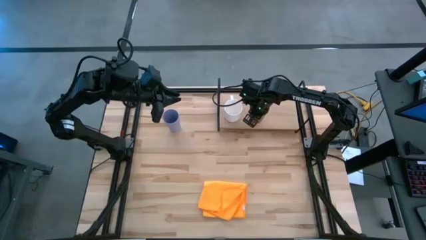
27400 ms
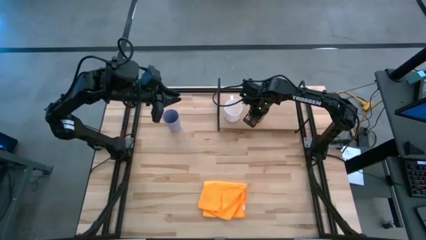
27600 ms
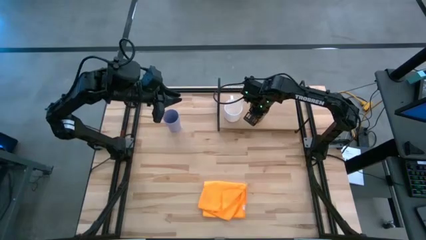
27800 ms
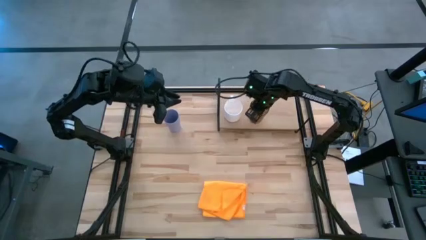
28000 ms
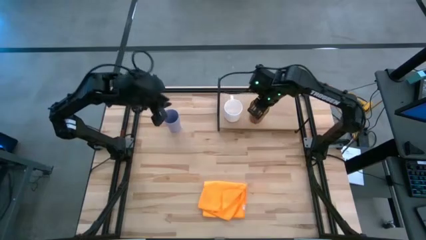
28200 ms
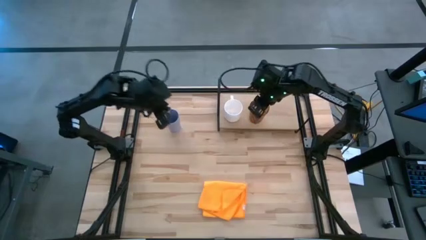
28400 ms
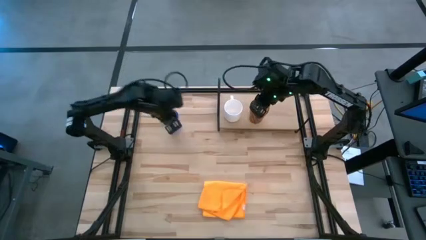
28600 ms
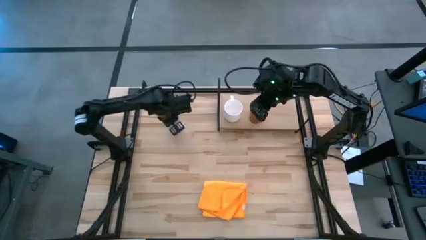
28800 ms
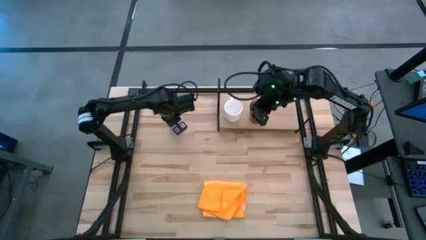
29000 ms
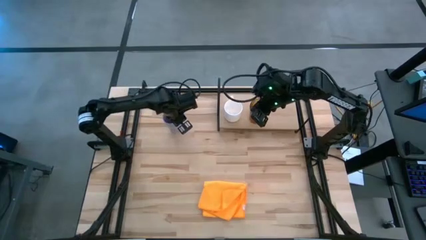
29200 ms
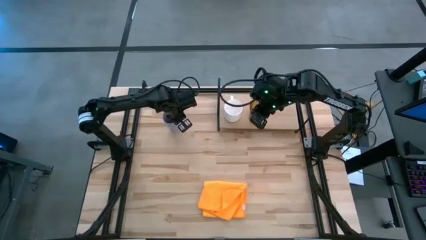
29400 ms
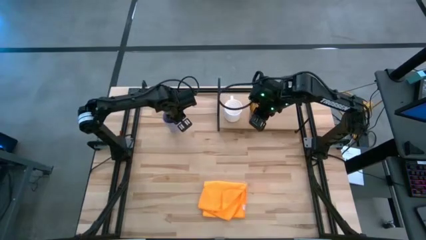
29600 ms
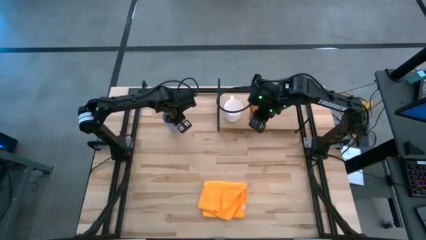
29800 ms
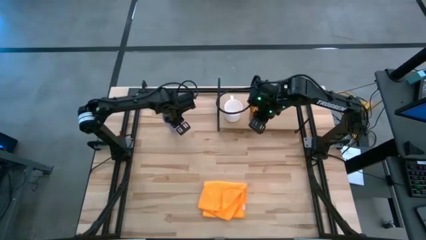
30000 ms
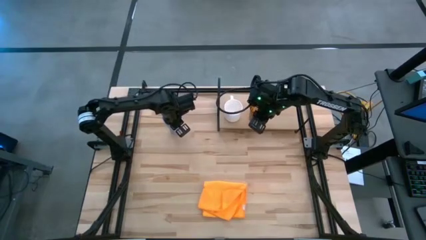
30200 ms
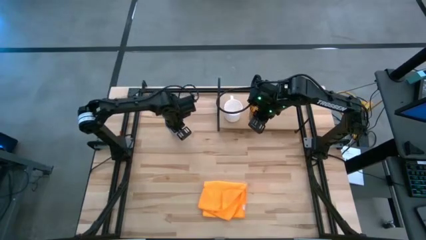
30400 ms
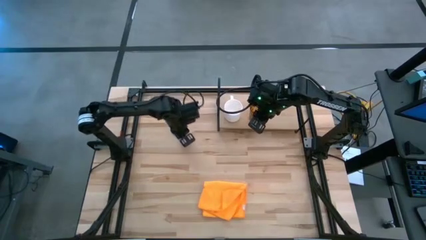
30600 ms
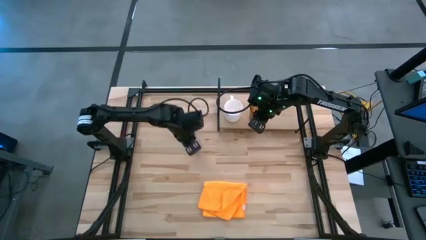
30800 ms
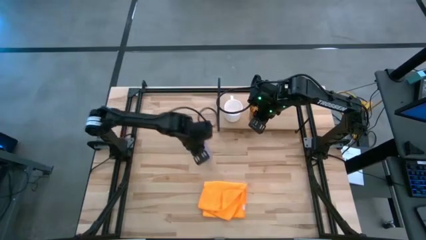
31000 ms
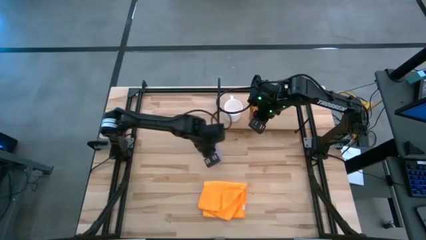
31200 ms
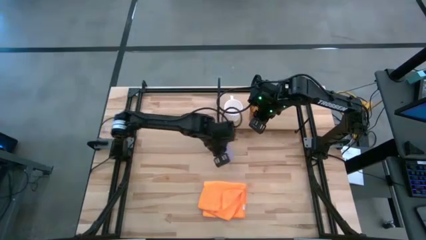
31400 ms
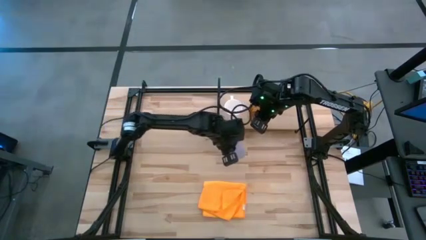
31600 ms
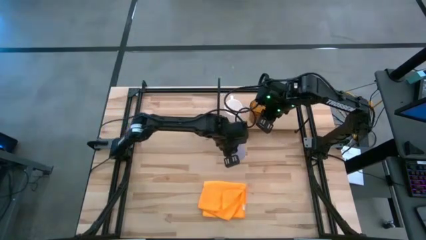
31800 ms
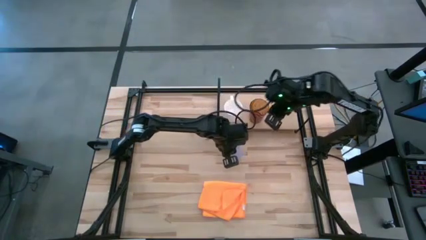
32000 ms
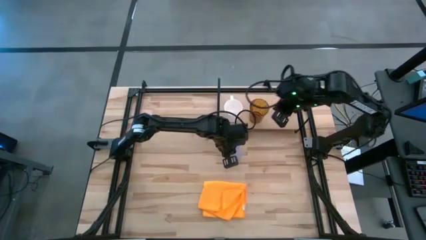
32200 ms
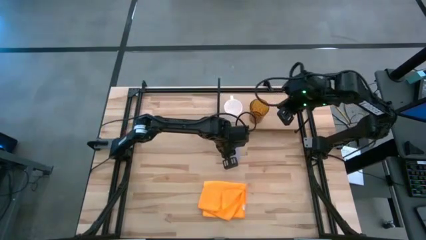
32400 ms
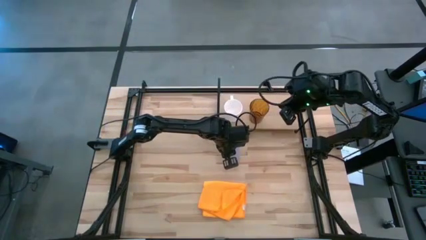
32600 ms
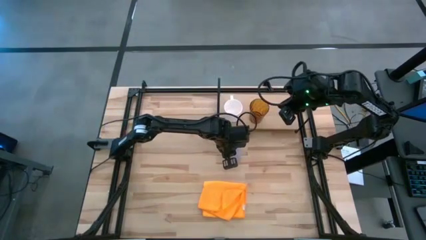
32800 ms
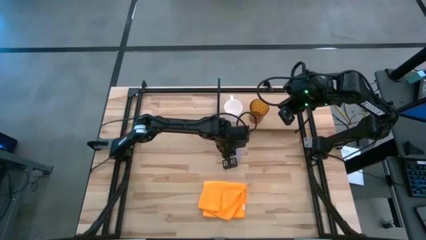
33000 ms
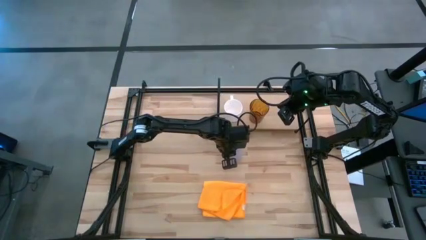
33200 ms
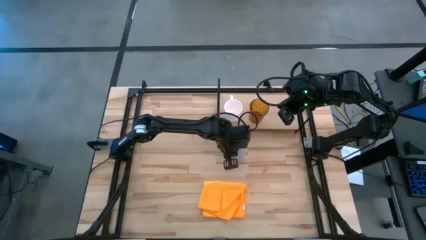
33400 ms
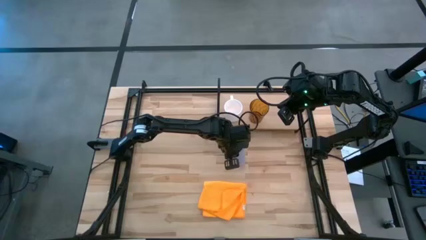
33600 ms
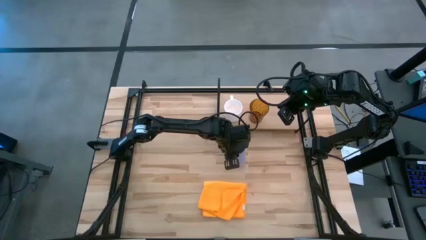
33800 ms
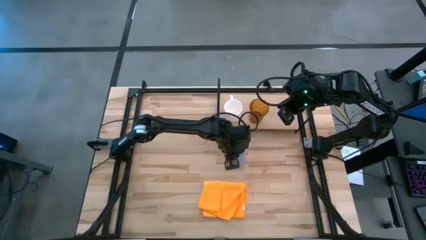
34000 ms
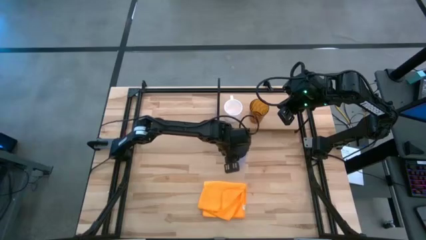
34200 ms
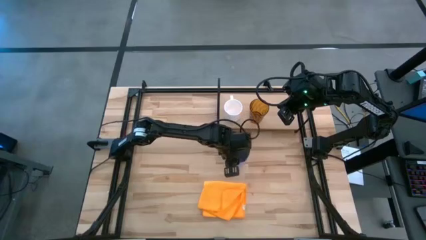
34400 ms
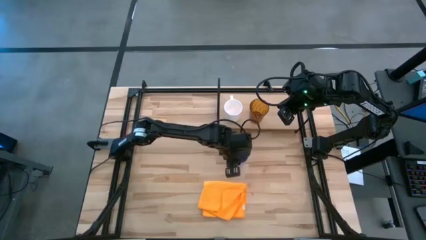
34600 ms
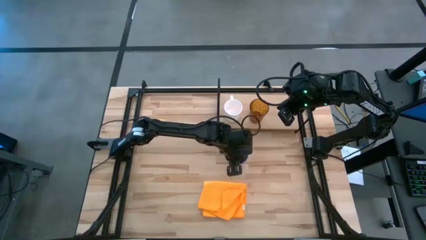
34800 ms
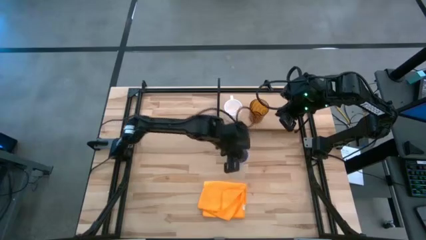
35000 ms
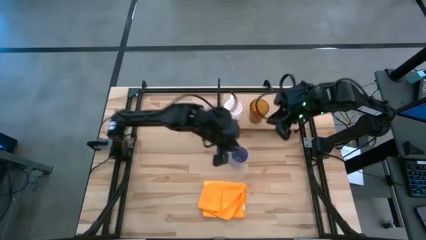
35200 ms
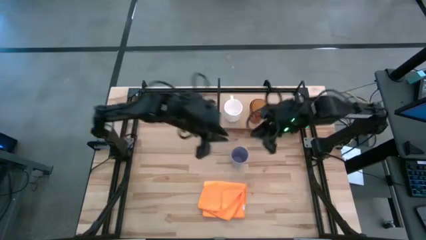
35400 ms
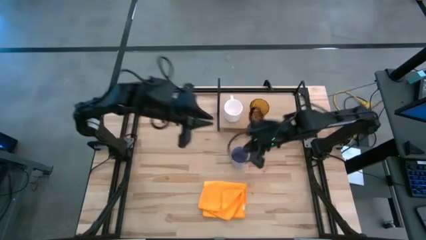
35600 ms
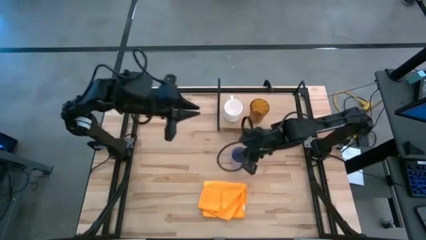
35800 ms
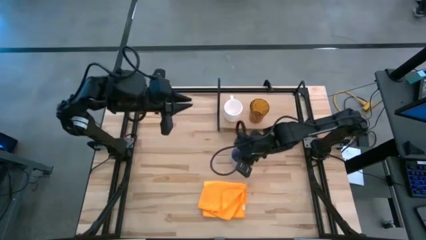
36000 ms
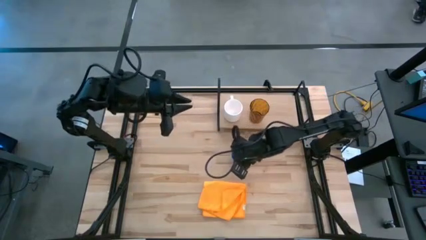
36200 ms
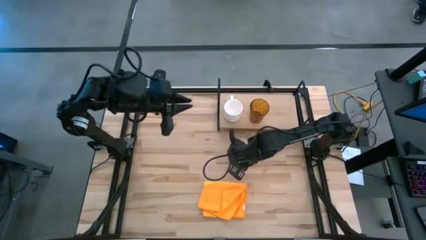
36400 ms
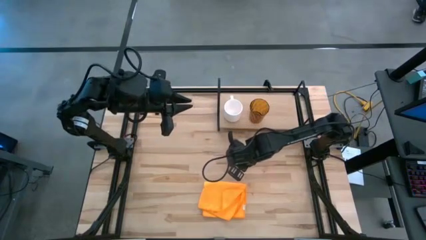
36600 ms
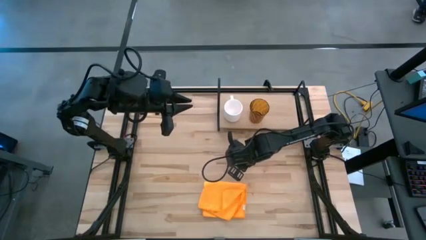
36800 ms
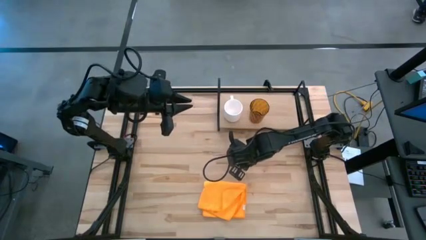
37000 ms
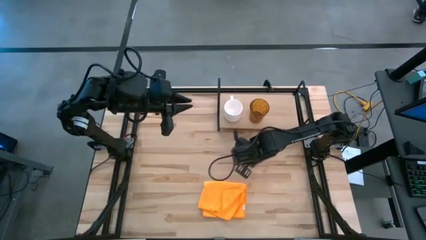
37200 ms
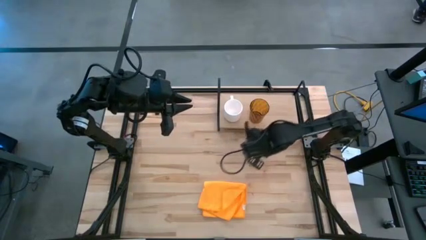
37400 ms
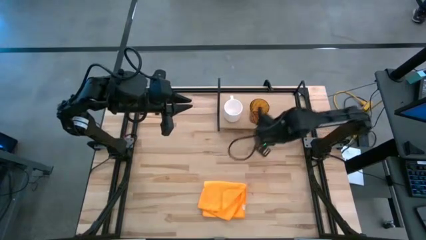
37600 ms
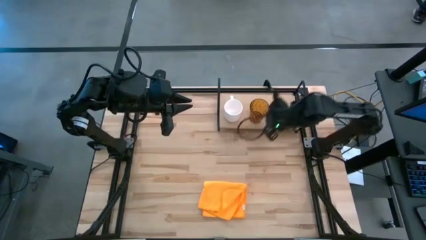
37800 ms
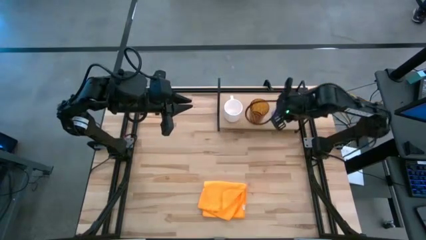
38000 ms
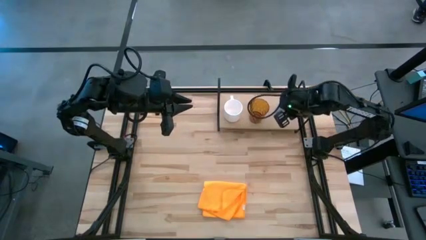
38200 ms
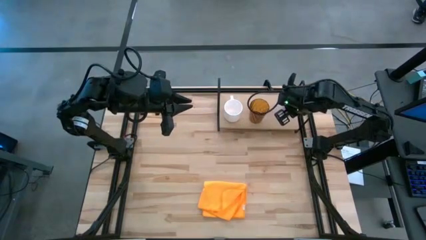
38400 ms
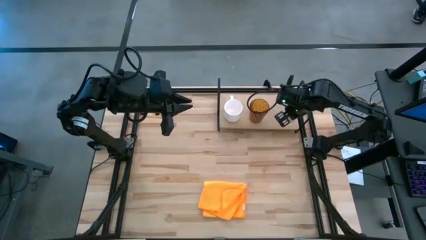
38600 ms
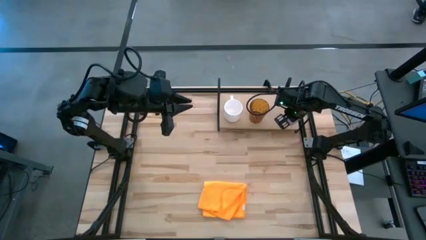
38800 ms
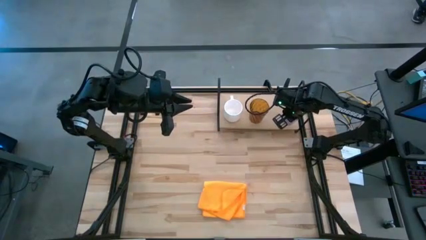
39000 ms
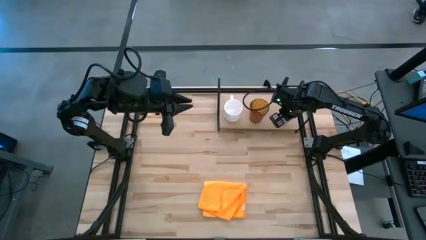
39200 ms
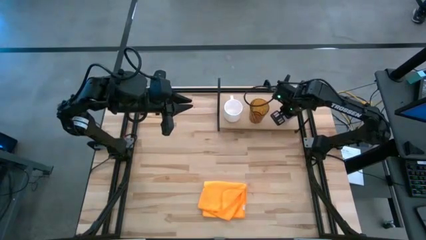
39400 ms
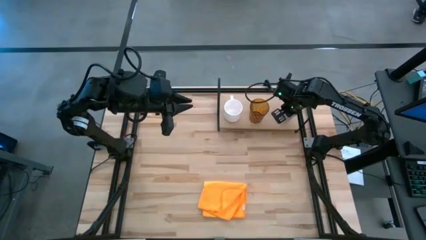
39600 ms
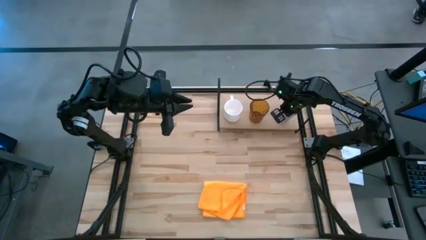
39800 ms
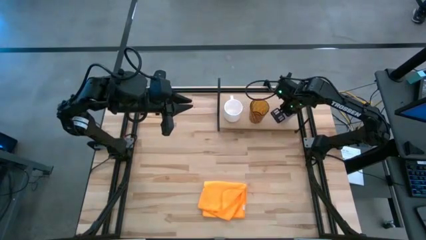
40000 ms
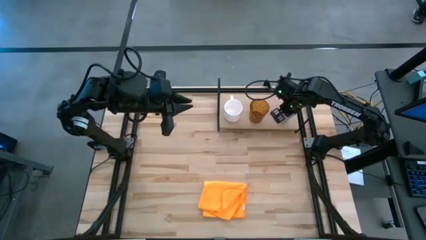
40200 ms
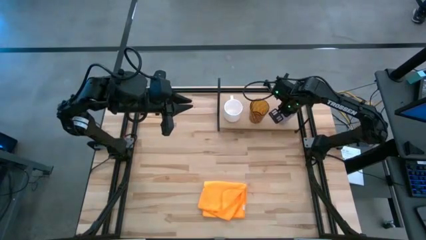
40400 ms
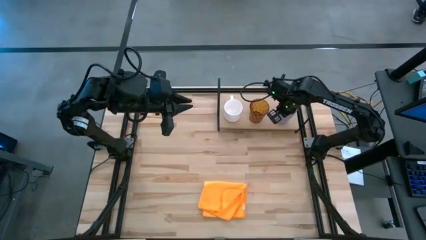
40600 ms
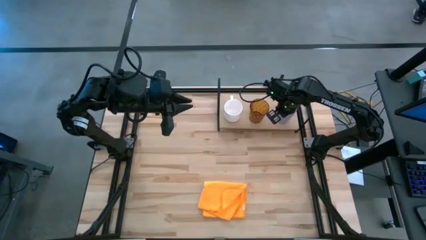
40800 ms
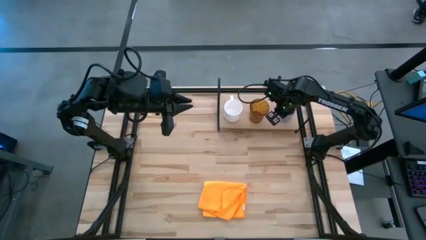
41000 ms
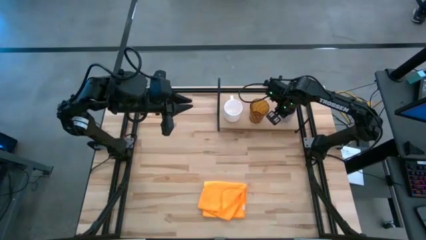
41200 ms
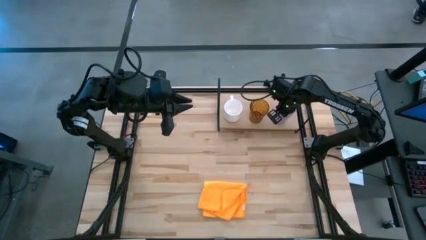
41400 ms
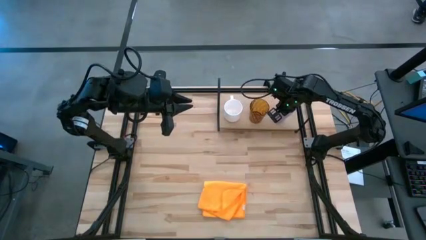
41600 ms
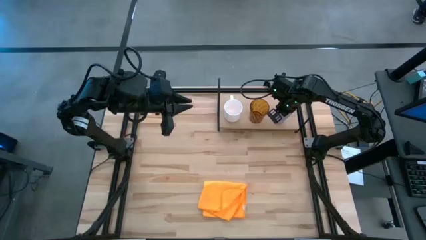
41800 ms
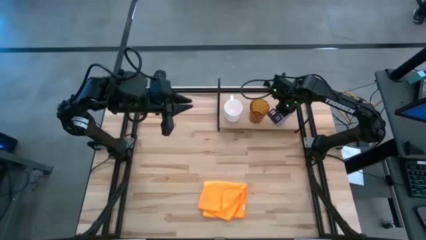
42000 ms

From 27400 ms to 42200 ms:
Task: Stack small to large cups/mugs on shelf
Put the purple cup on the shelf

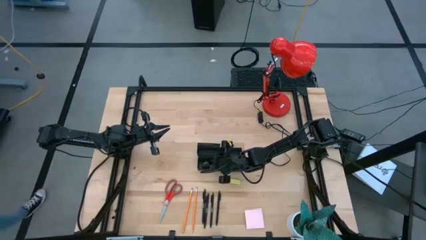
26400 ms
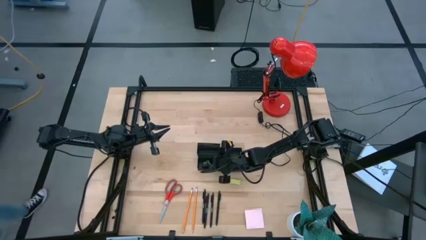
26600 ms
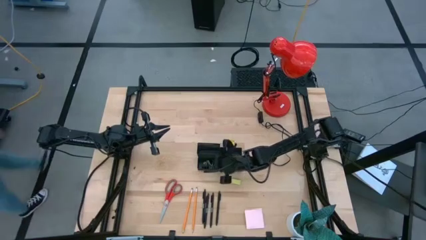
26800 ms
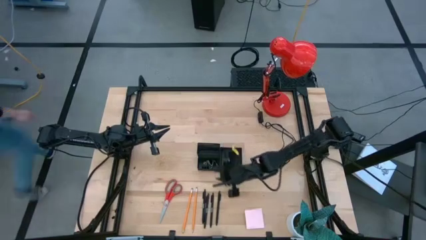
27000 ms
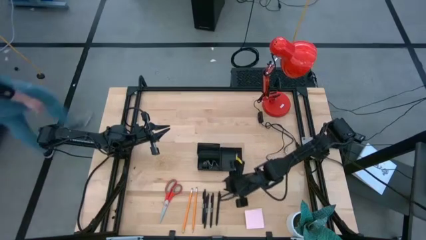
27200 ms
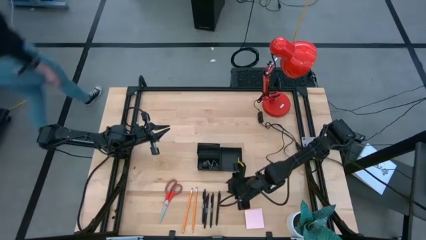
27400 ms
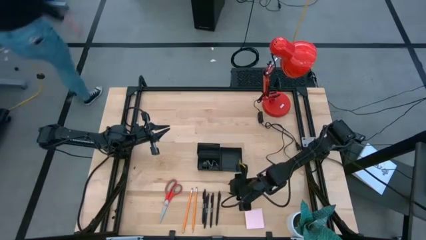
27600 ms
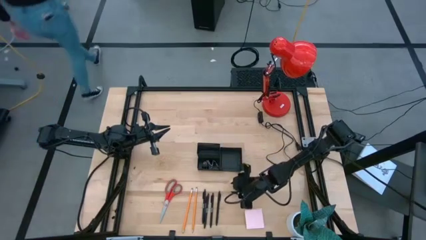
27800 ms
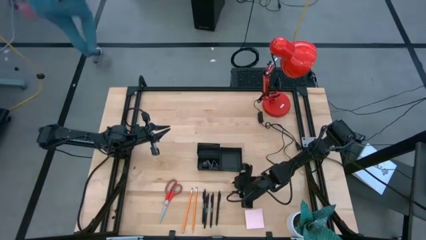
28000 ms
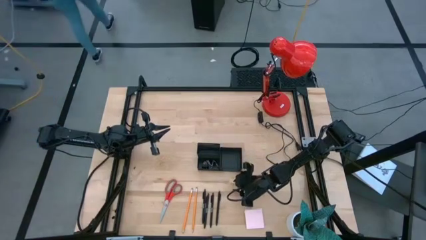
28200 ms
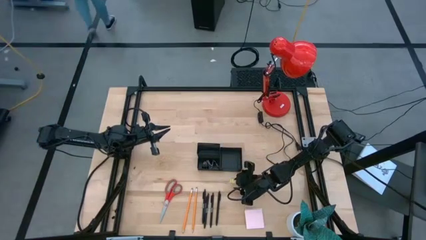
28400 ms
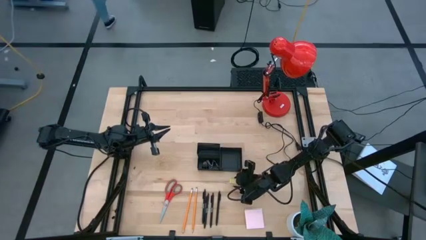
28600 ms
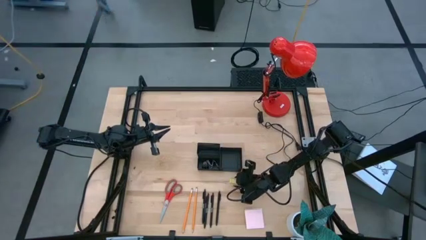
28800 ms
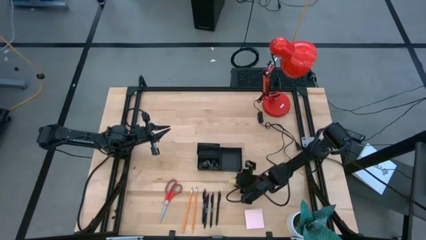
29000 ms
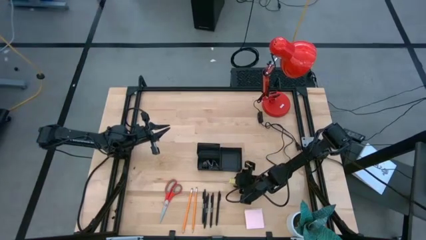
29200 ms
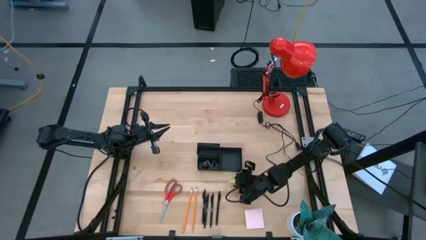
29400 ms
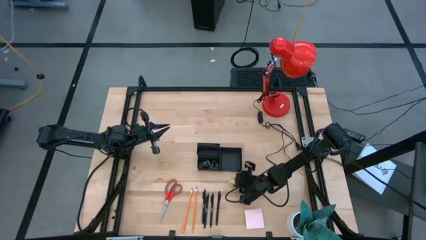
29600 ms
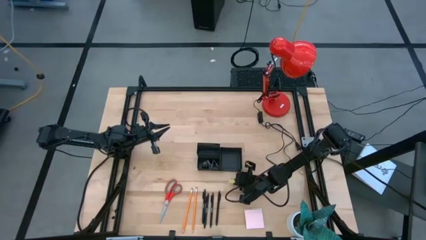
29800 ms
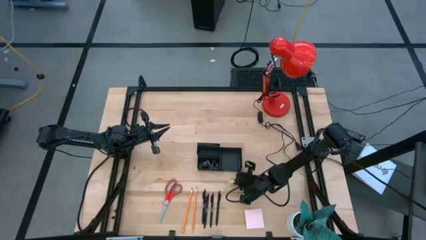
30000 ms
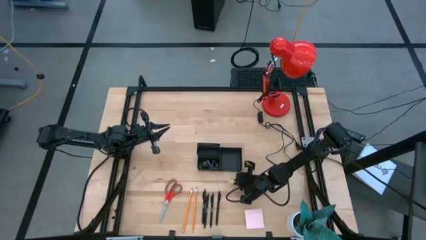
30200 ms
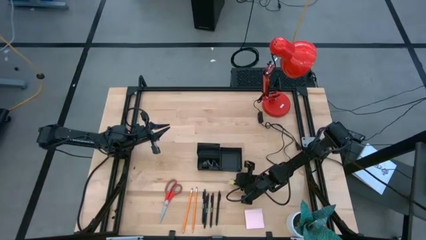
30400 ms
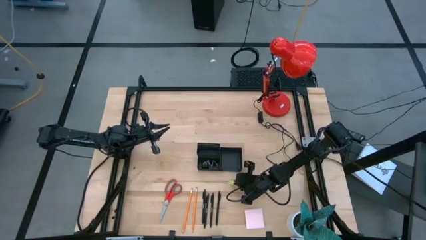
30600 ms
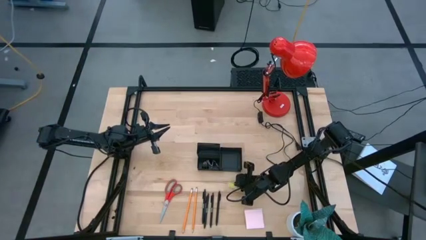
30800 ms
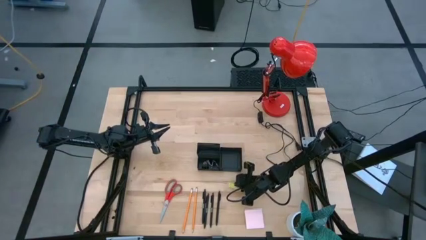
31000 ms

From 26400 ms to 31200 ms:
Task: Pick and place office supplies into organizer
Put the green eraser into the black desk organizer
